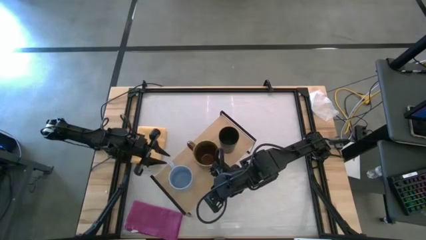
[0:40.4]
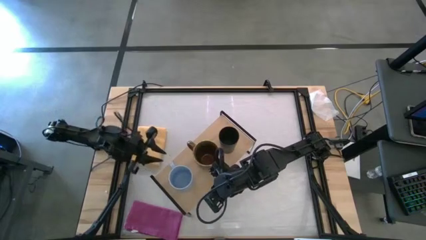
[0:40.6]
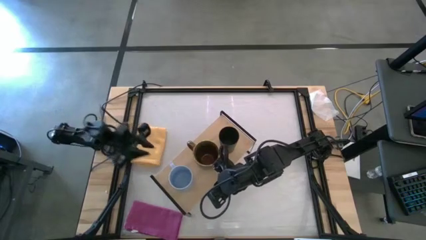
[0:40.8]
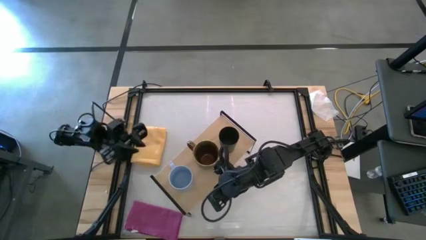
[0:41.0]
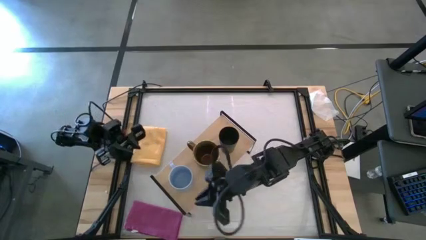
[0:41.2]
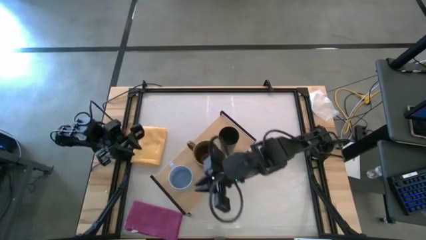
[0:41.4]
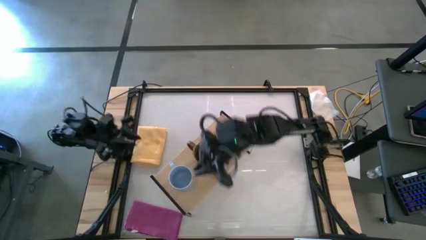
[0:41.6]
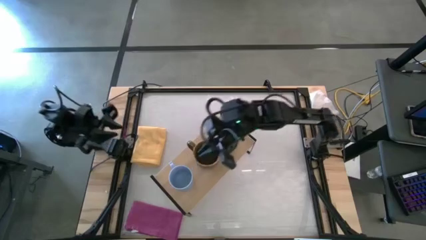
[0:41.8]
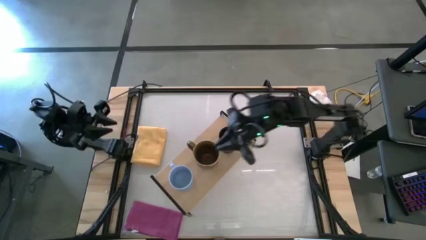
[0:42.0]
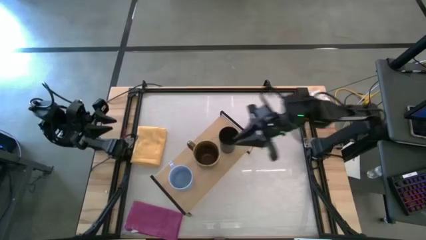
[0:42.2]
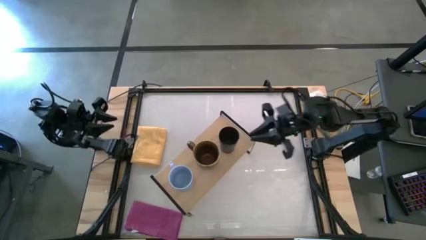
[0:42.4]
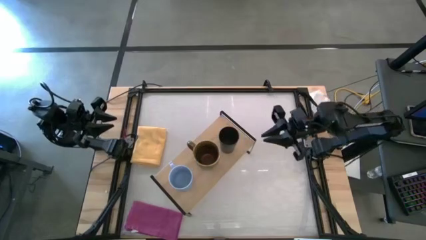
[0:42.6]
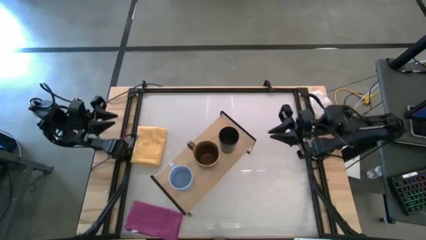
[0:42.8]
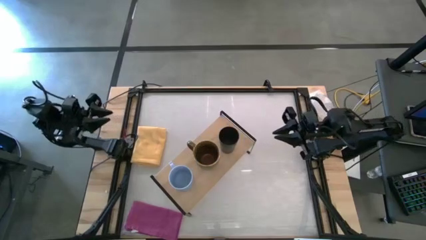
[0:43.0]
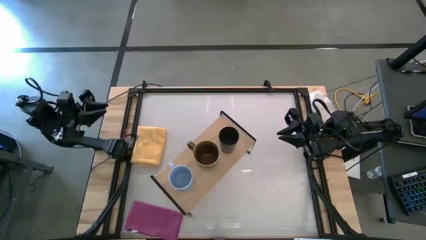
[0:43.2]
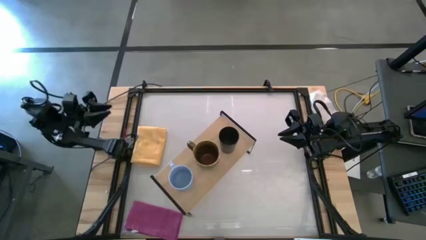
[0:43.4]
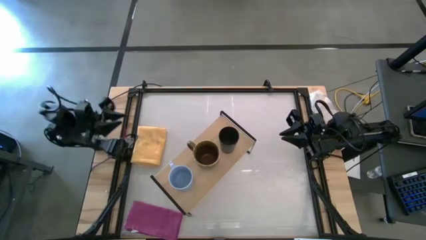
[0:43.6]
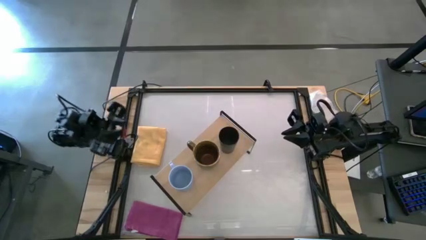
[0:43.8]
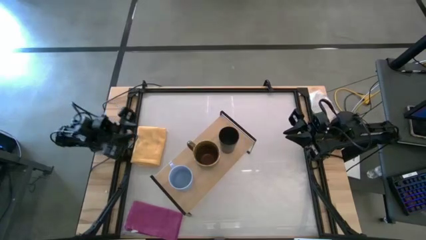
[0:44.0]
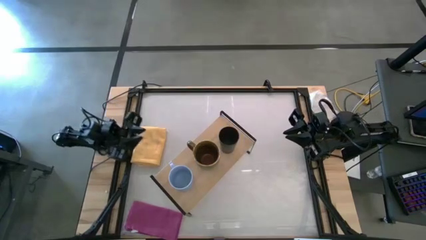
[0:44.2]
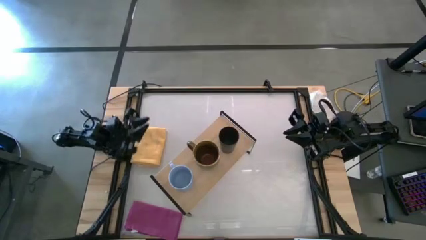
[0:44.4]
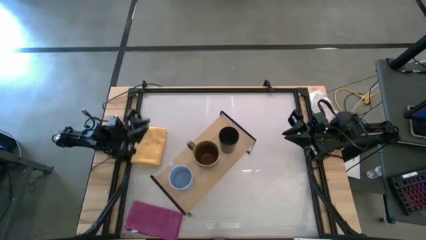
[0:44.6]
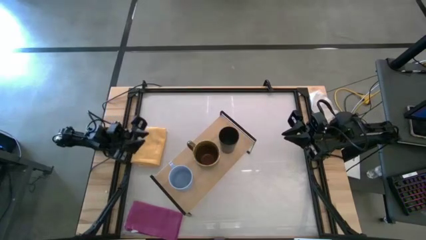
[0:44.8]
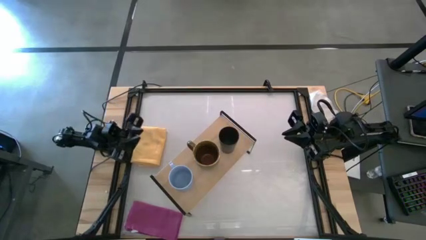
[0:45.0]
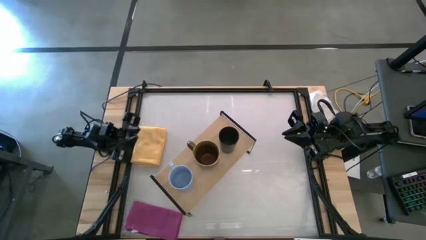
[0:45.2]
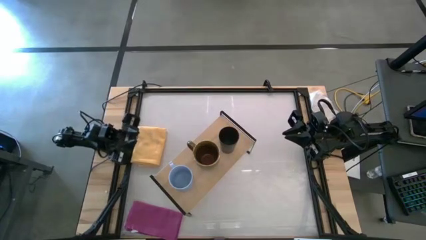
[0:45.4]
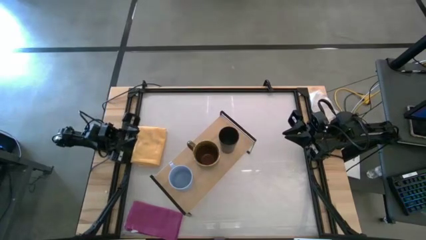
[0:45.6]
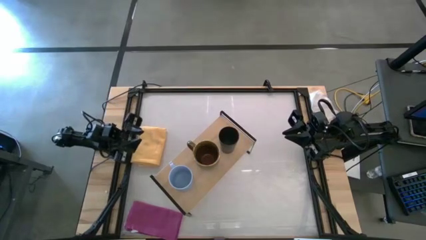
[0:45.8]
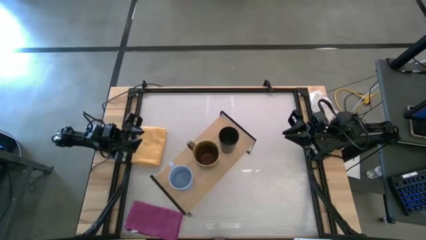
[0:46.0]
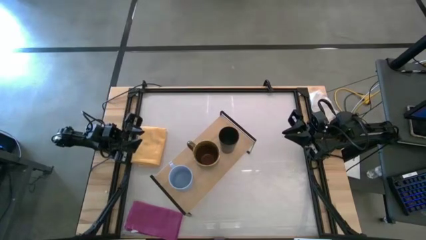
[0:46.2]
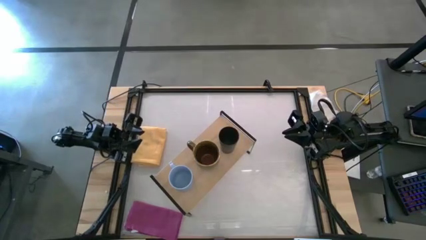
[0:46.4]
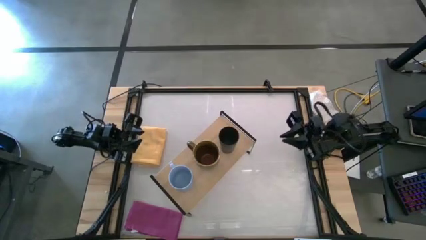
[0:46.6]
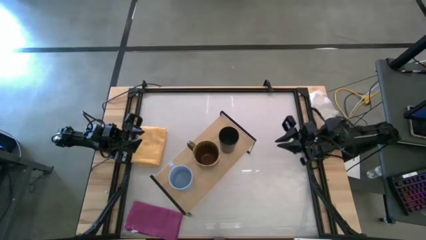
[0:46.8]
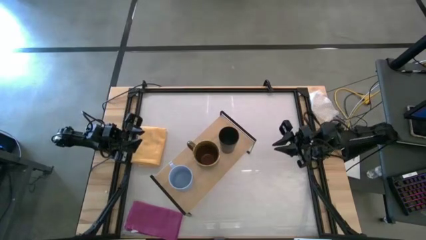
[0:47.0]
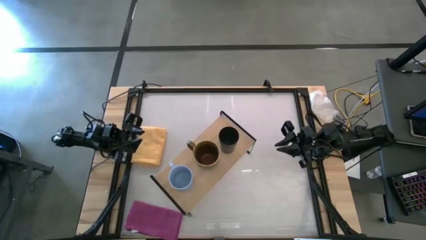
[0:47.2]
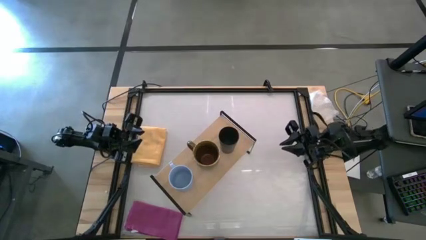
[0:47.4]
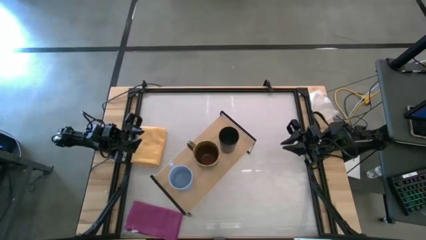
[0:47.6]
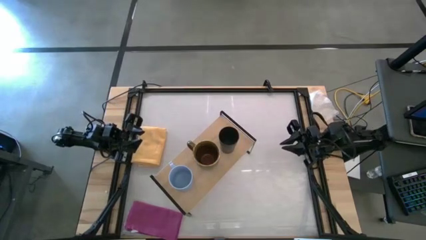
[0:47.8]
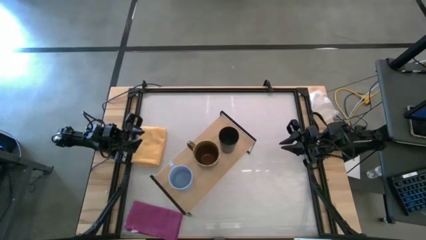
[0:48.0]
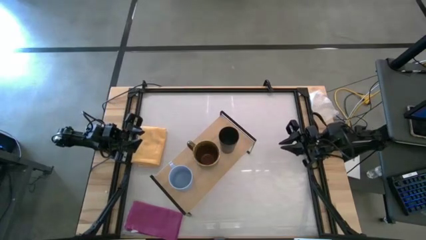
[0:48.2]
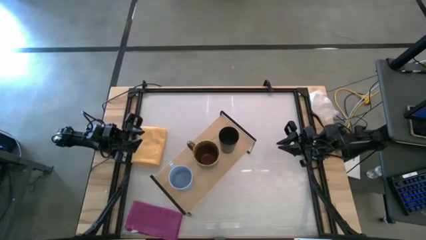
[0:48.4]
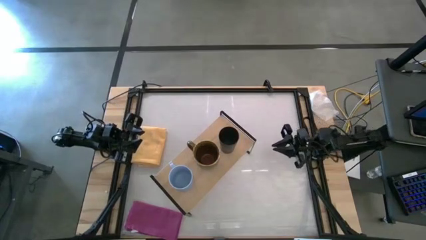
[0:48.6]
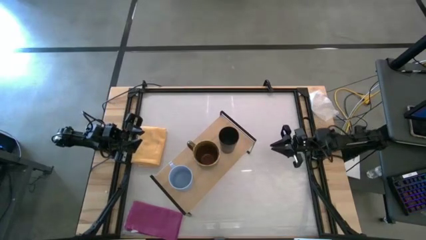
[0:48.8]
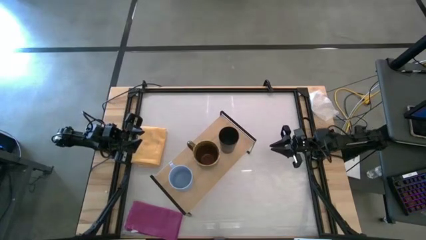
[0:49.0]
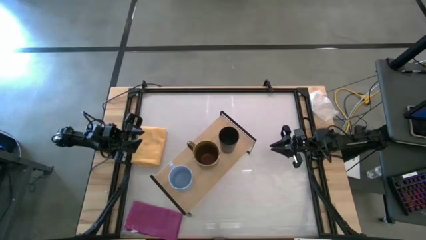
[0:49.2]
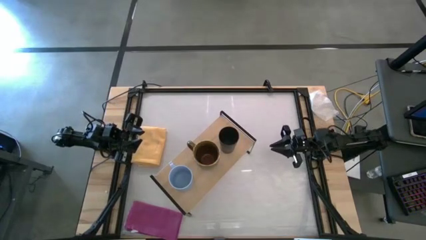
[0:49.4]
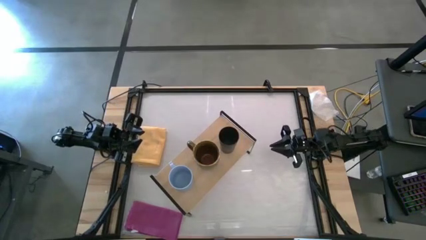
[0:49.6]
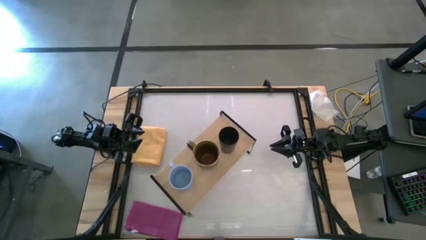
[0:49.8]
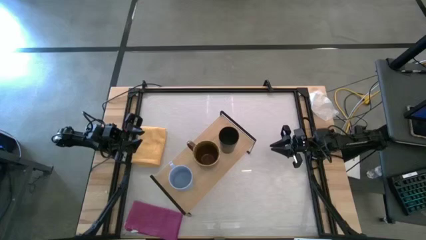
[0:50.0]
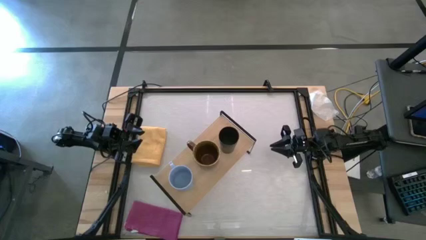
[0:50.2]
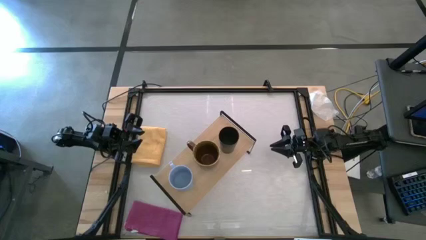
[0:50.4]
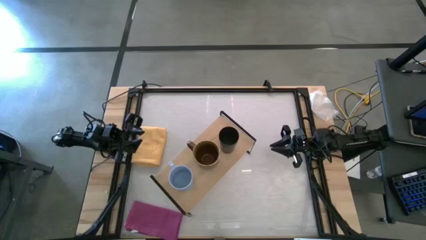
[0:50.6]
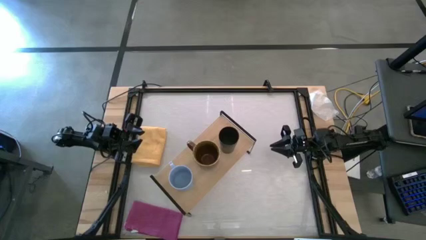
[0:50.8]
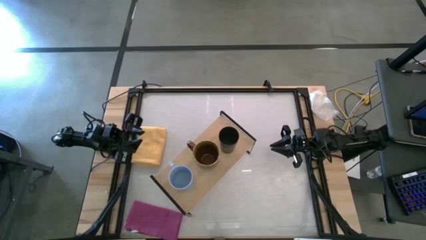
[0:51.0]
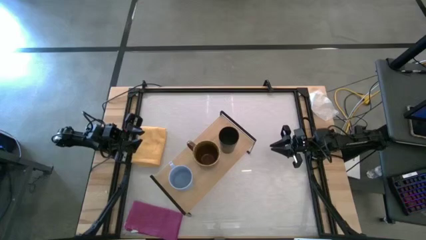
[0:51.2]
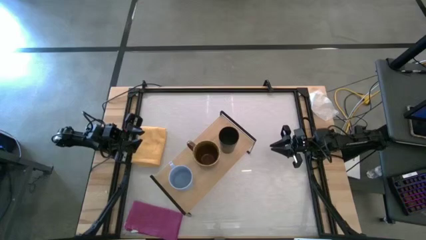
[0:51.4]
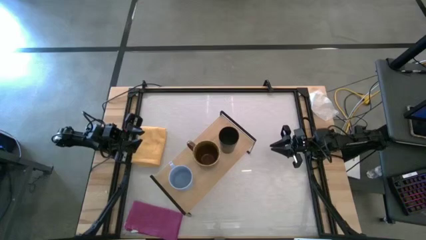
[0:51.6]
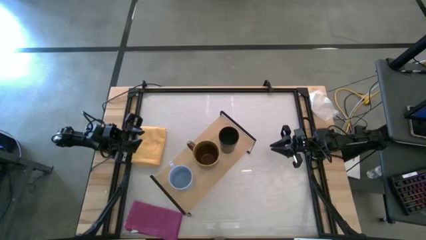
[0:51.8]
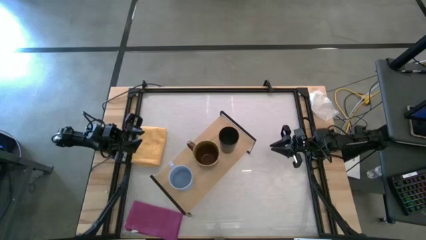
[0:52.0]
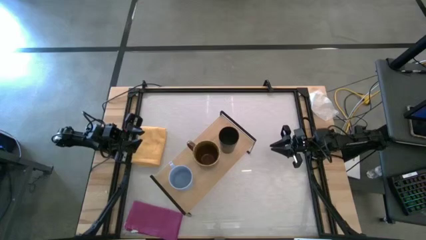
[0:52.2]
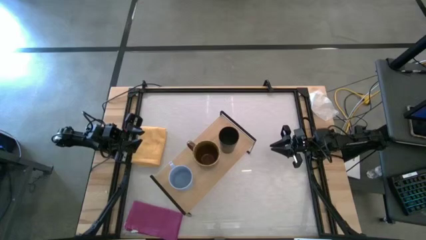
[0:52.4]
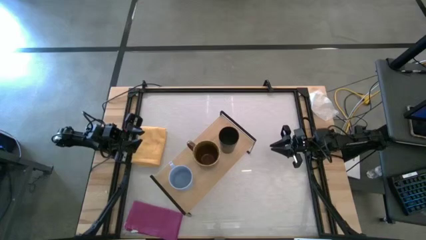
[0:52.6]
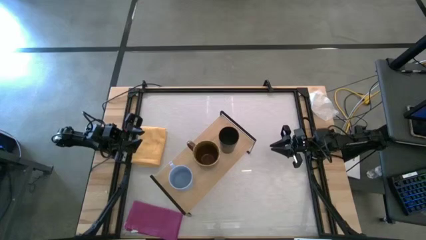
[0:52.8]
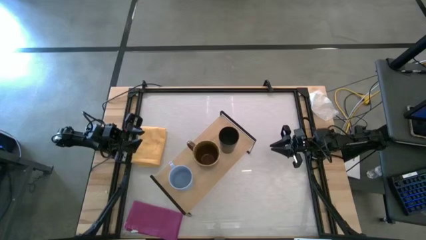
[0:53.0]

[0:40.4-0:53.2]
Task: Stack small to large cups/mugs on shelf
Return to Home Position

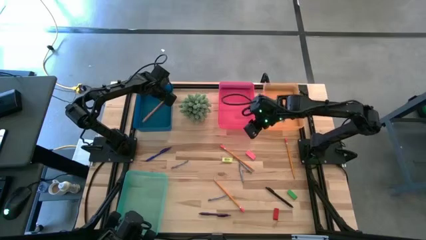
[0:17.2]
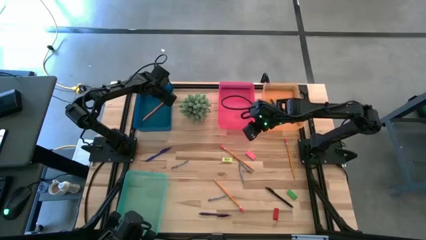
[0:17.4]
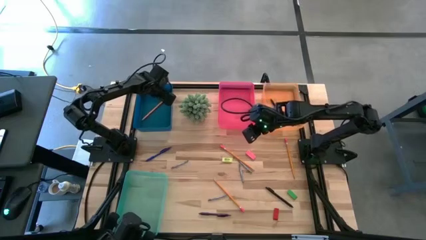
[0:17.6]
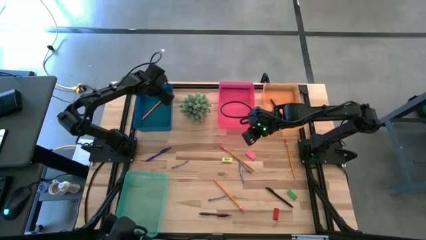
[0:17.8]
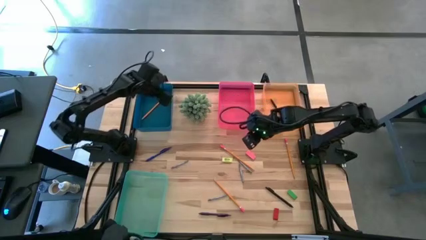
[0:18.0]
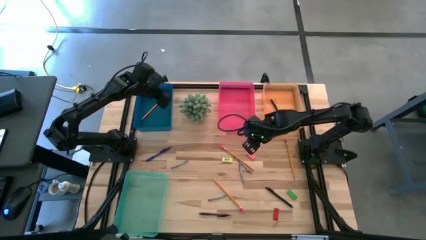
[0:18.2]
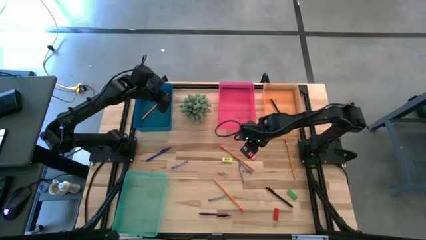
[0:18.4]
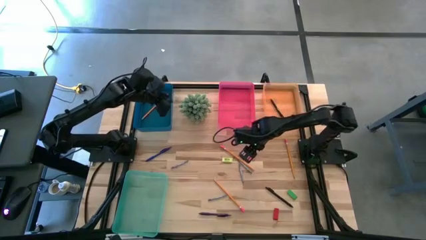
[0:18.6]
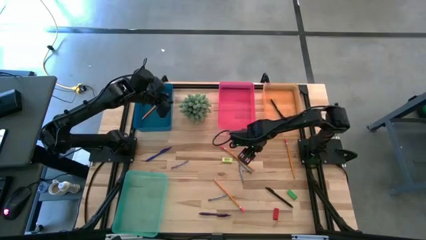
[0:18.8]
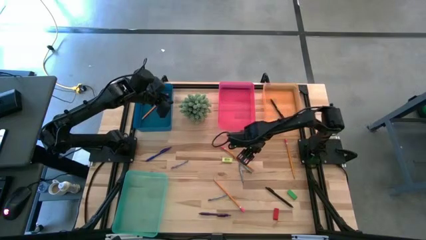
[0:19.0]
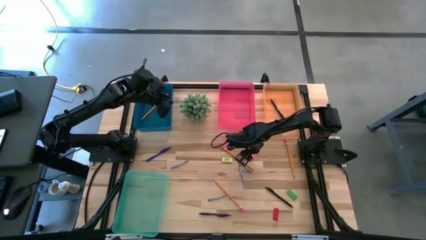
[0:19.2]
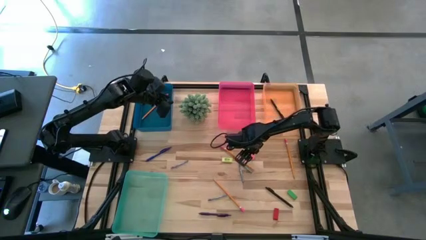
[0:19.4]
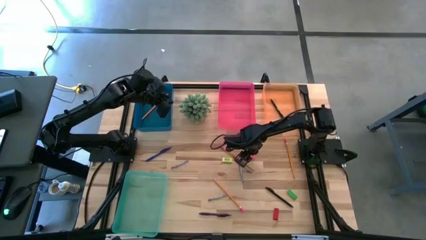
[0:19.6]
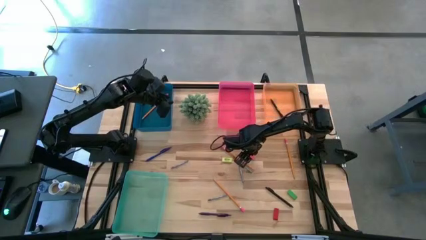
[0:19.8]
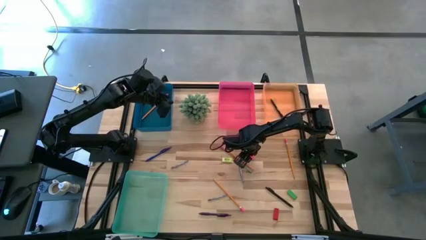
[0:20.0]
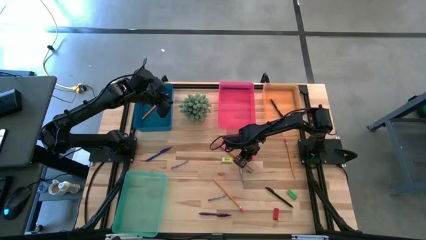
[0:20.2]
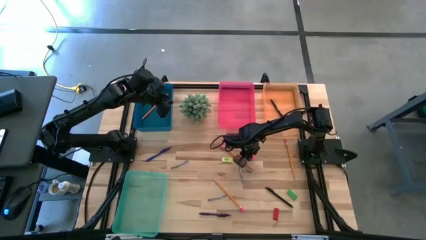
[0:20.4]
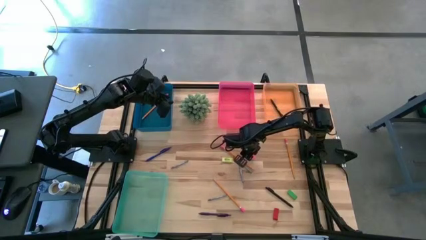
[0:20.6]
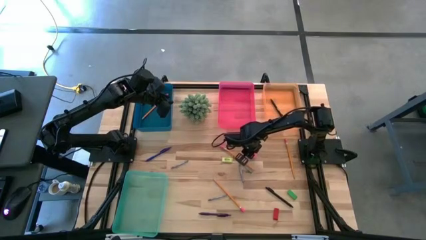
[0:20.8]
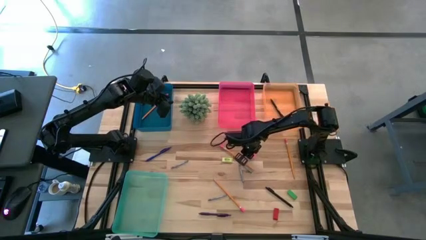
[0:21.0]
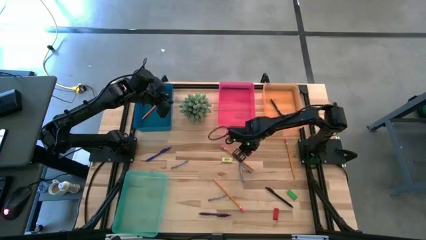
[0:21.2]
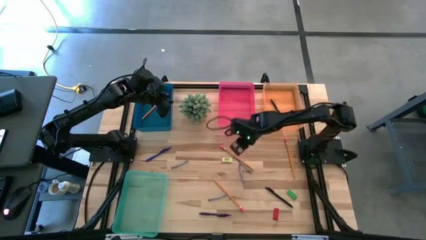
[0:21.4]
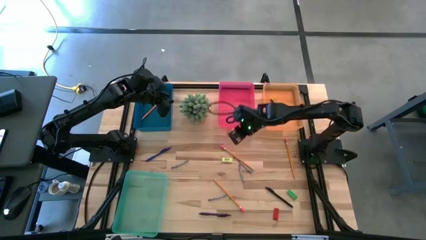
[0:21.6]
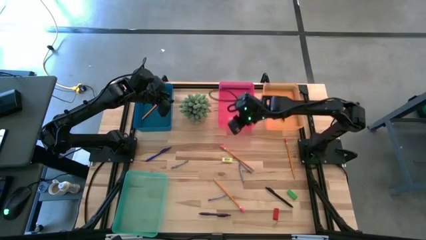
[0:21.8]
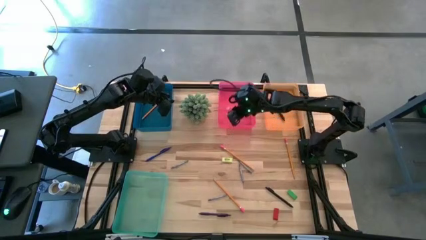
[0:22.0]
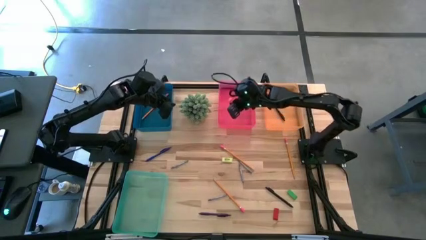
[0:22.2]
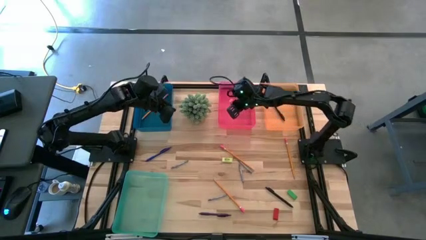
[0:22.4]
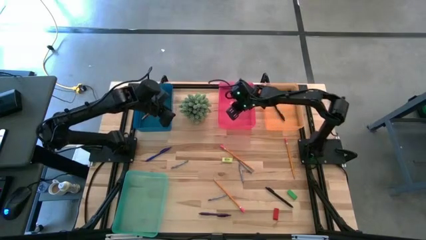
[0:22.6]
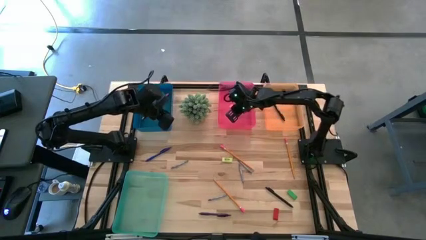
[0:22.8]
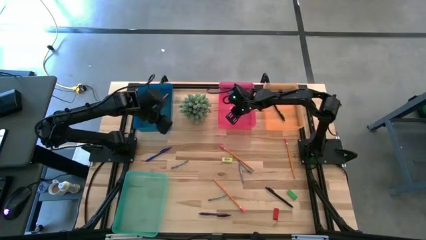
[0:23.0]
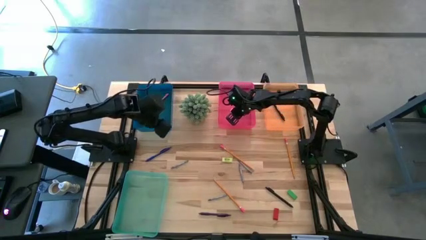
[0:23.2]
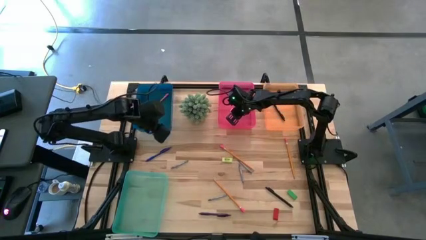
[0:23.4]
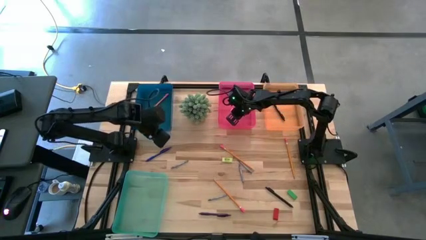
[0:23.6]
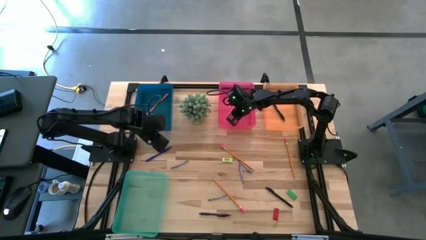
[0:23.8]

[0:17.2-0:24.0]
Task: Sort crayons/erasers/pens/pencils in bins
Put the pink eraser into the pink bin
